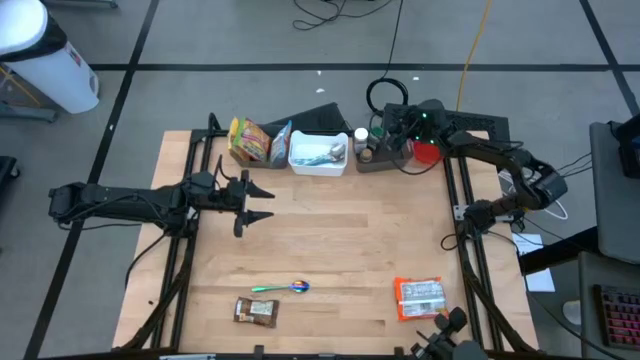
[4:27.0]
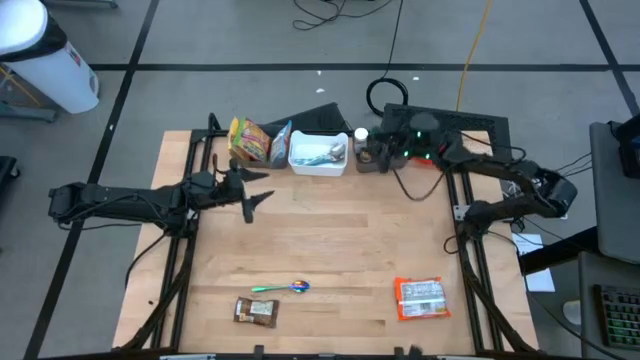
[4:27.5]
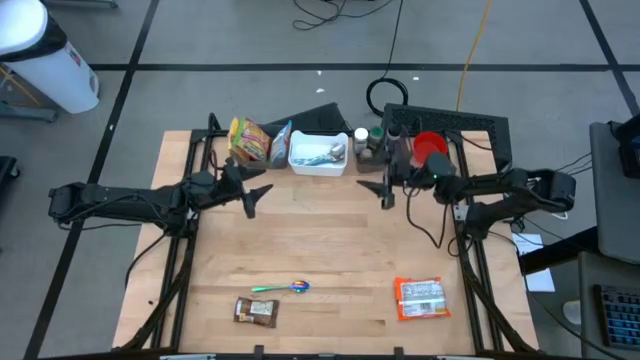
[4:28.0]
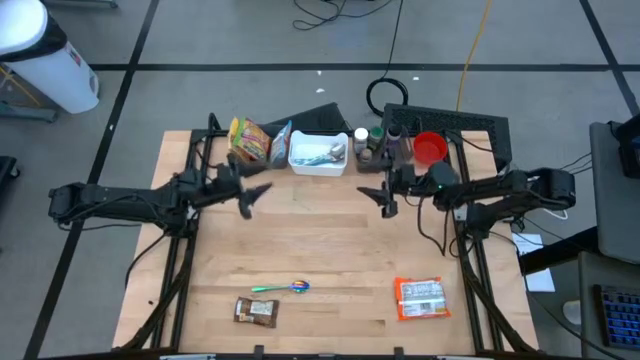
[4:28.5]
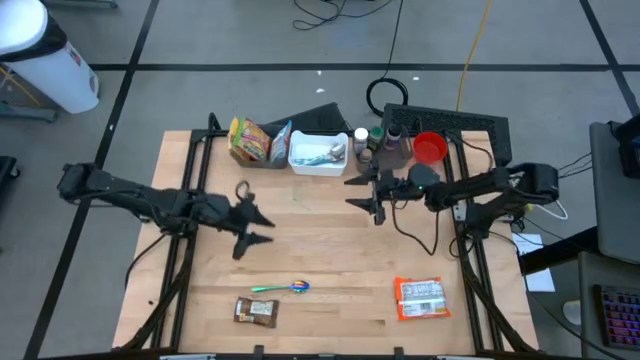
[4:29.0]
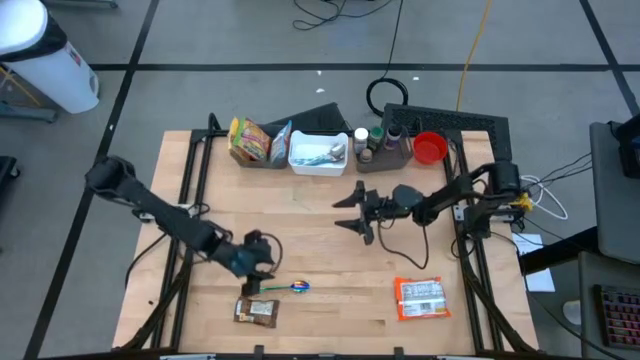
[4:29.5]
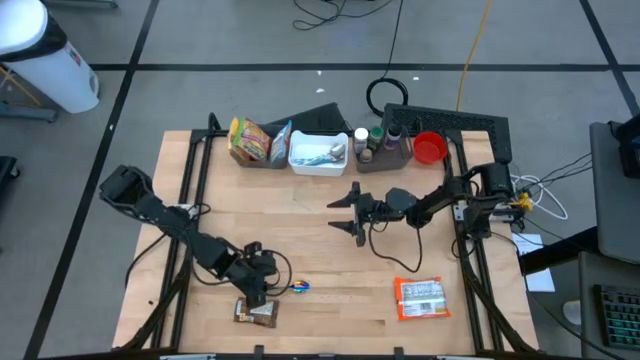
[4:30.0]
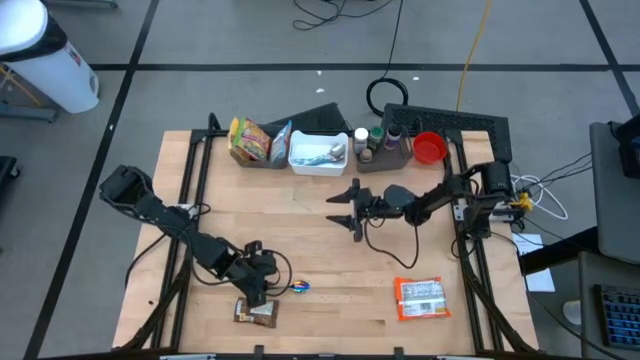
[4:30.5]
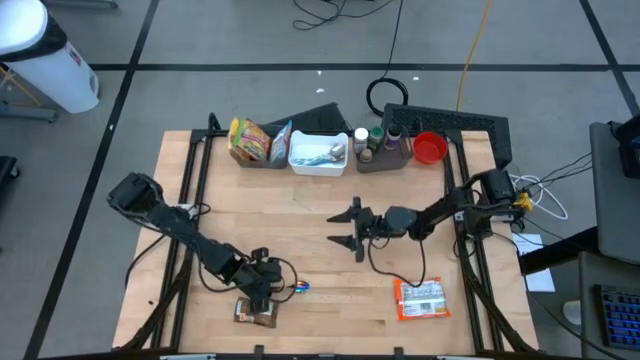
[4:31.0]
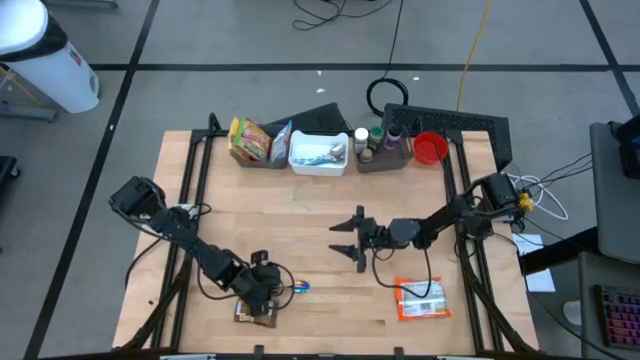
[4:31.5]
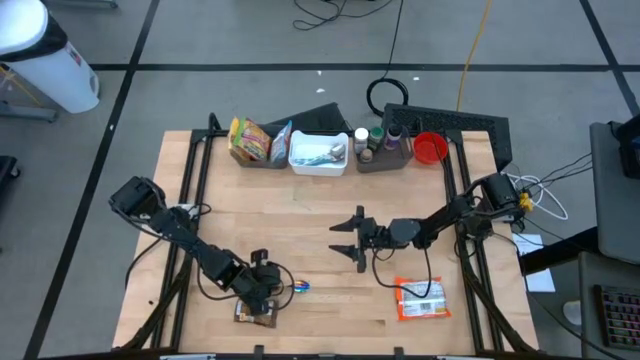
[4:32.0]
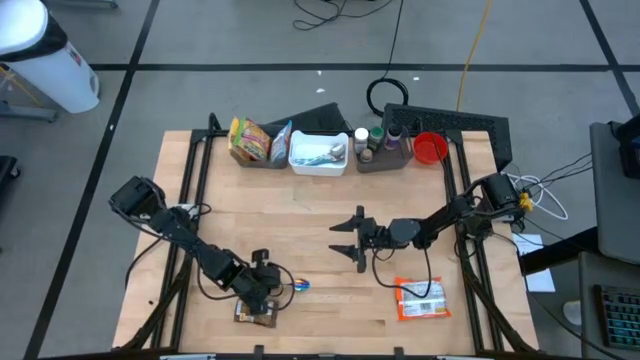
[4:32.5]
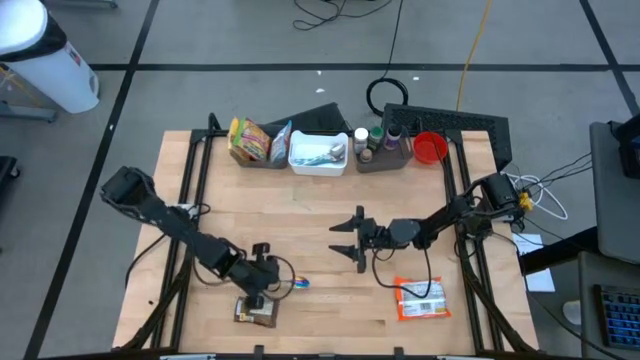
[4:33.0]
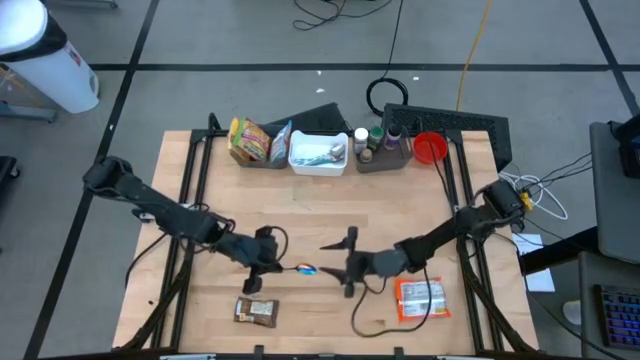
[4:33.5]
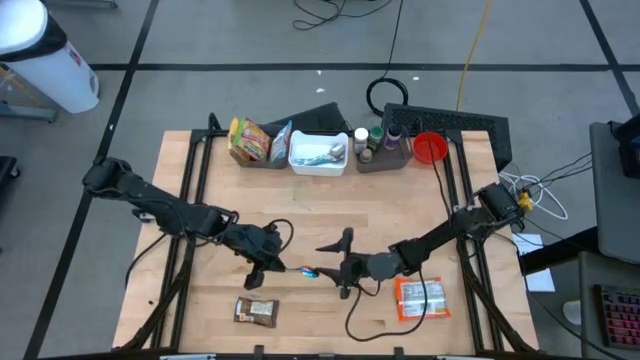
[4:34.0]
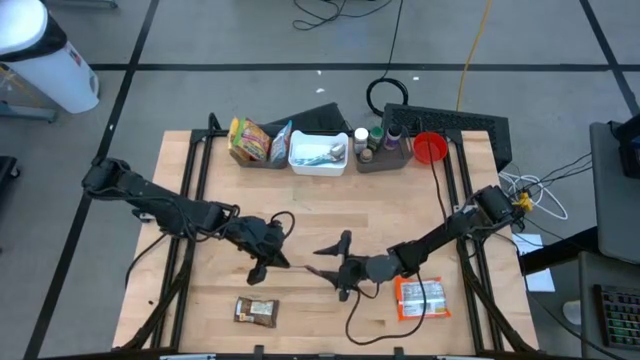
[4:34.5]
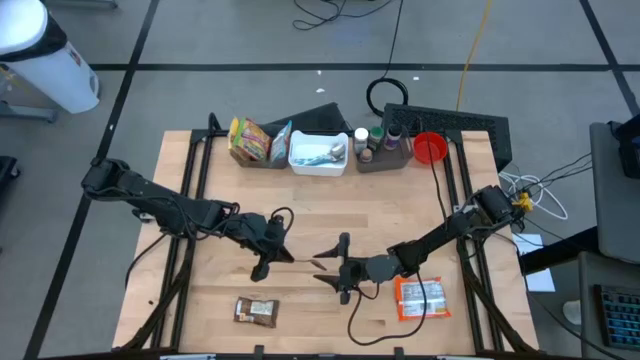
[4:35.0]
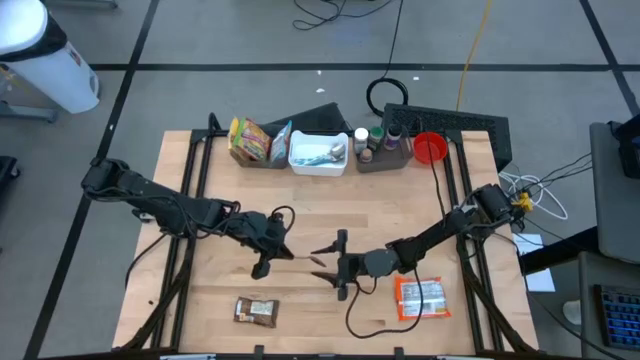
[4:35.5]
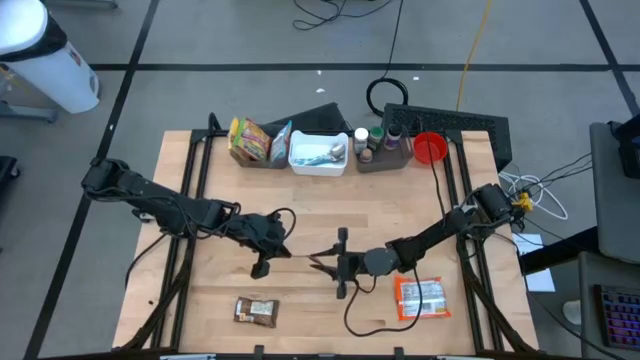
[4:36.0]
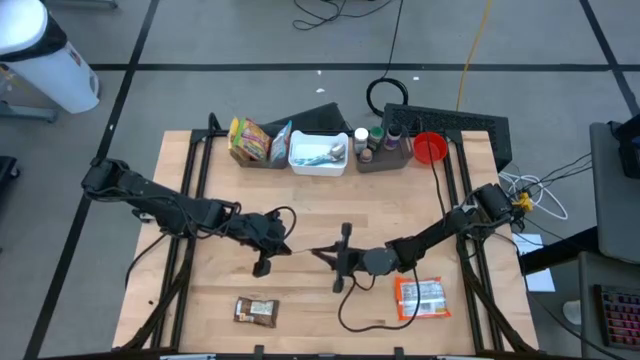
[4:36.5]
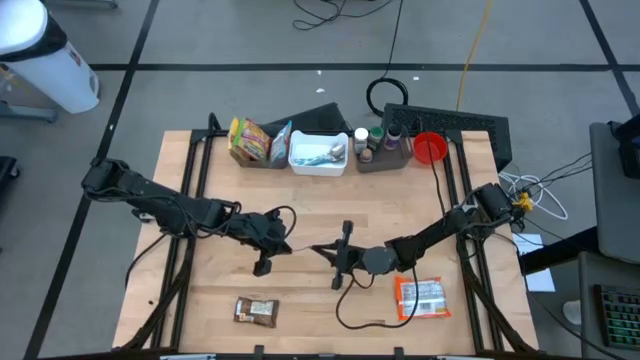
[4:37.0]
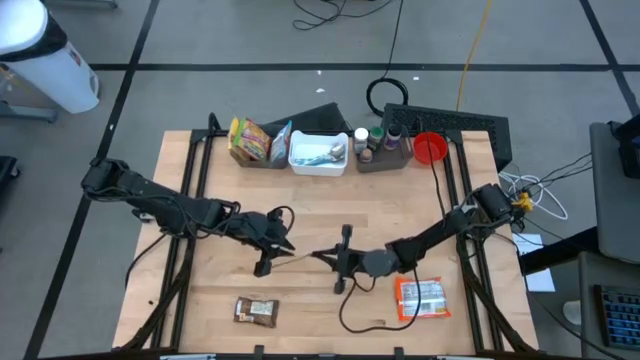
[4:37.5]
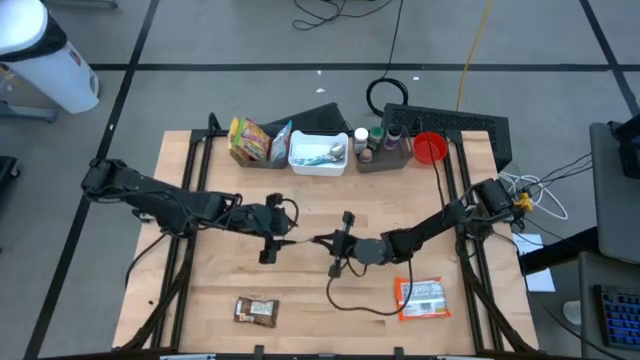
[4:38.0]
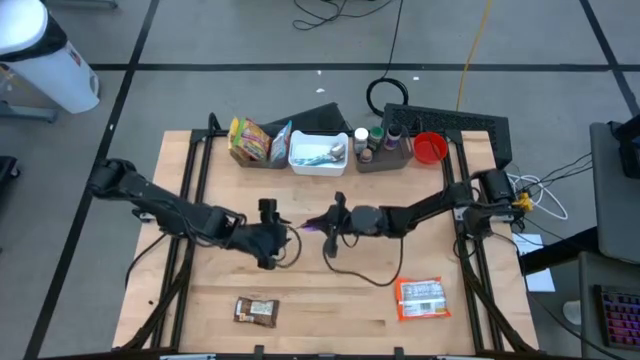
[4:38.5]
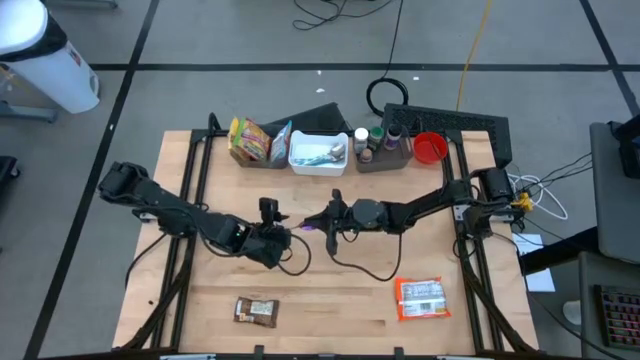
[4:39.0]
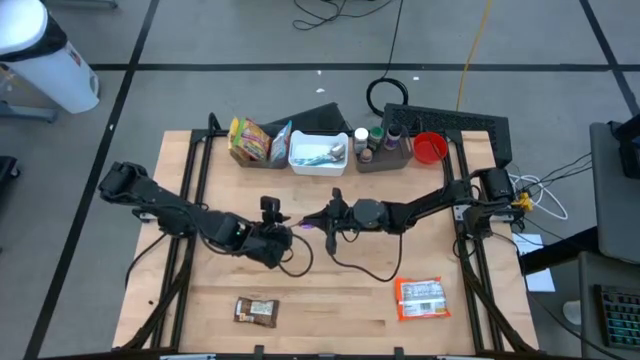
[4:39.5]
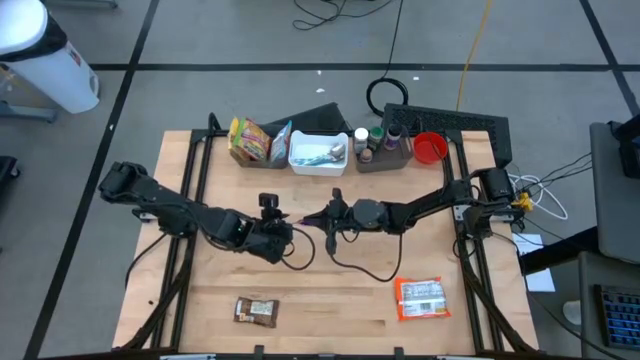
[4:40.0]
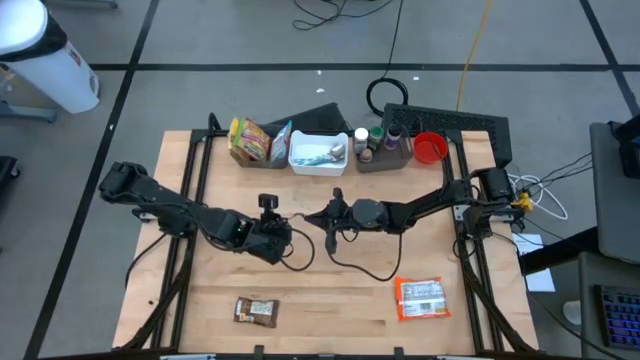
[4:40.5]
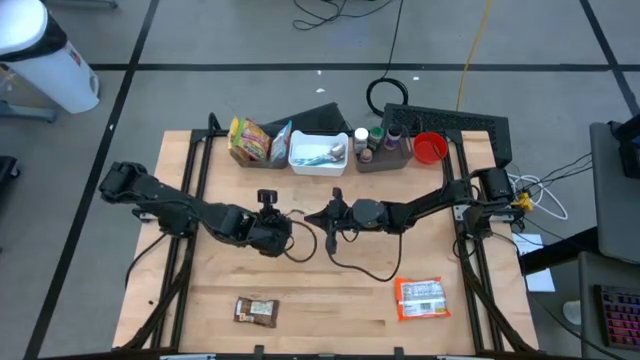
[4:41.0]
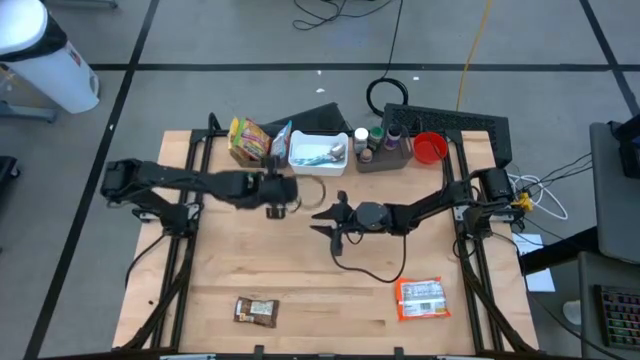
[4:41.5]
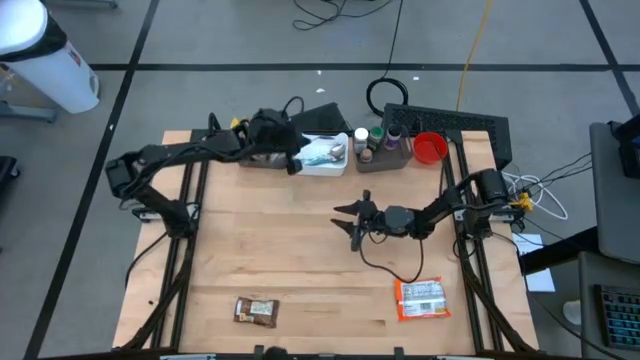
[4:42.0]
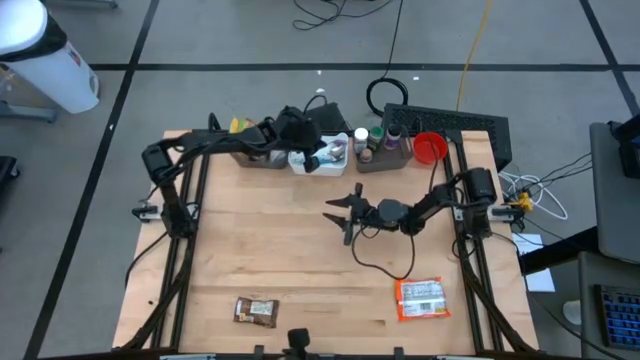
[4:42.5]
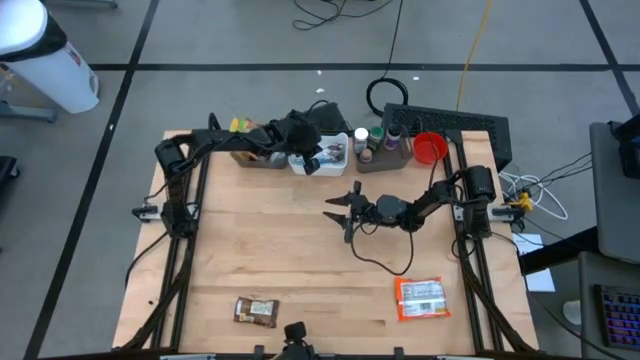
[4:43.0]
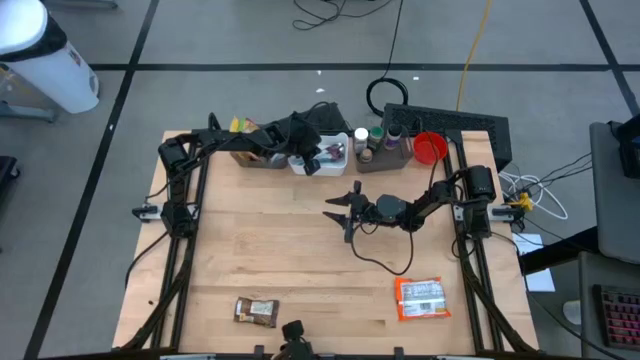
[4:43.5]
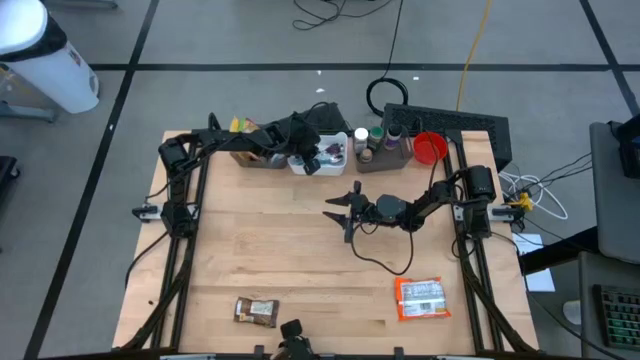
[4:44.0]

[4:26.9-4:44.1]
Task: Pick & Place Food Item
Put the blue spoon into the white bin

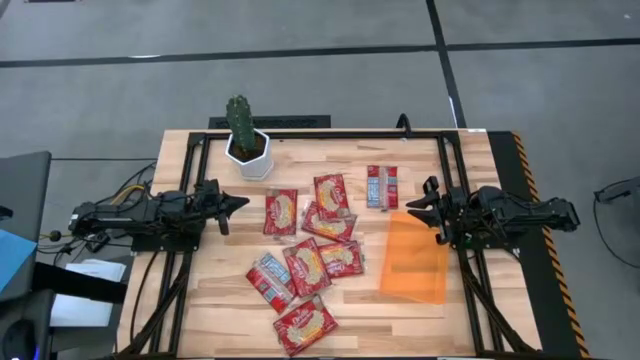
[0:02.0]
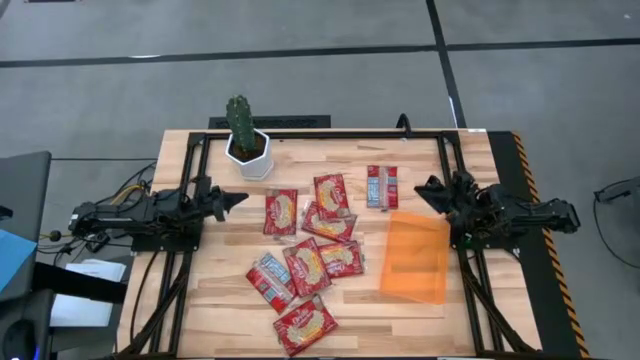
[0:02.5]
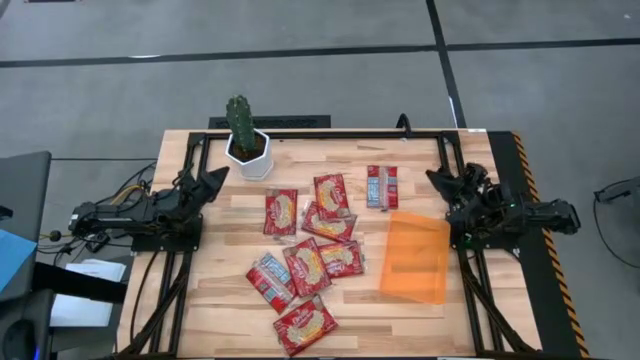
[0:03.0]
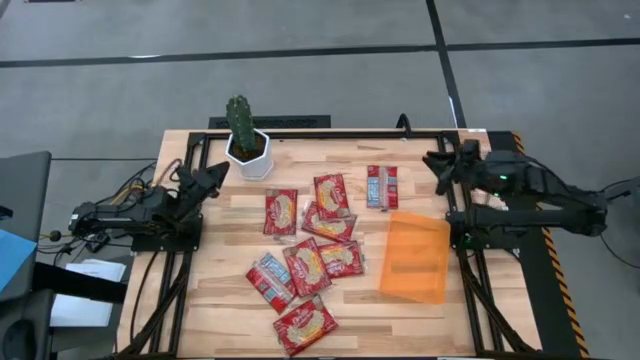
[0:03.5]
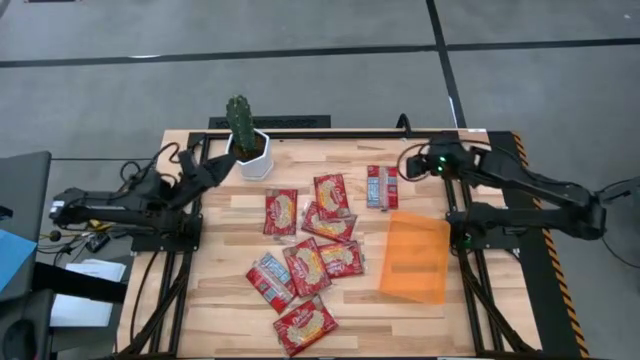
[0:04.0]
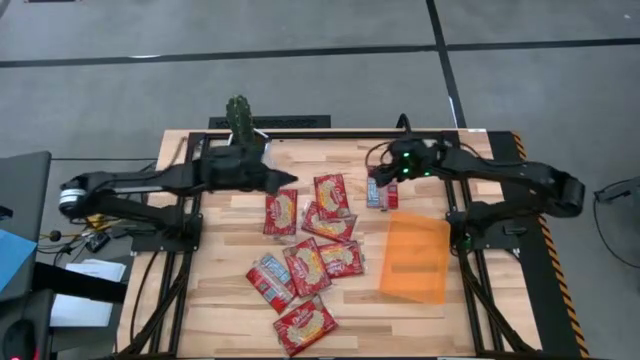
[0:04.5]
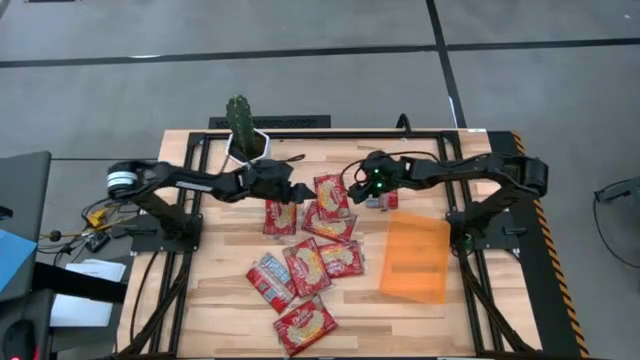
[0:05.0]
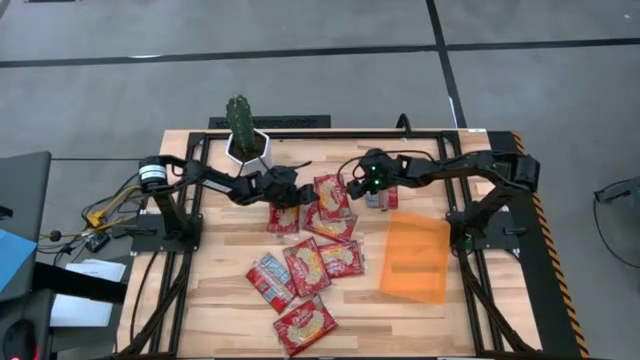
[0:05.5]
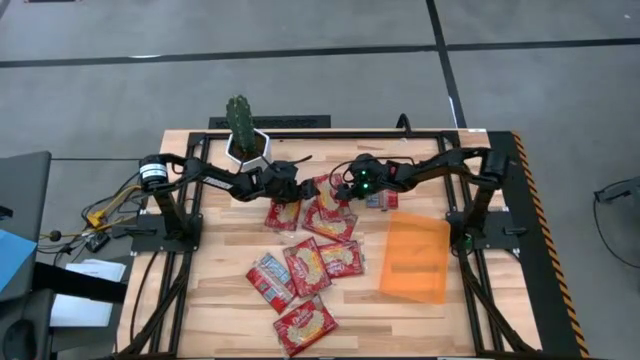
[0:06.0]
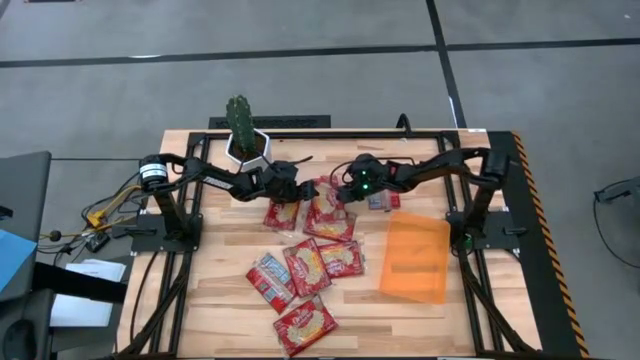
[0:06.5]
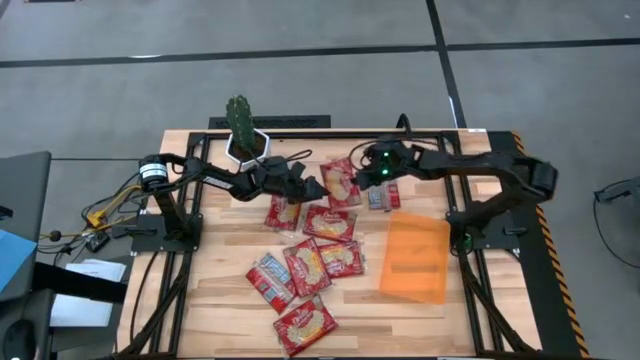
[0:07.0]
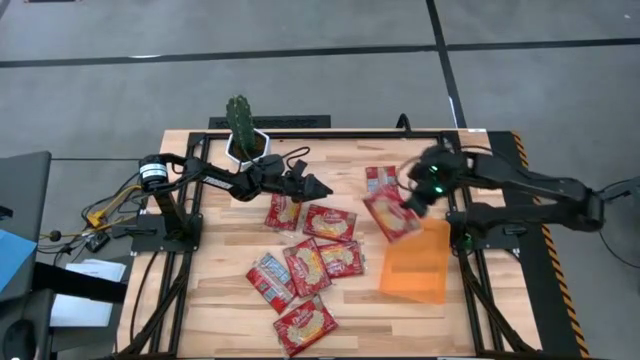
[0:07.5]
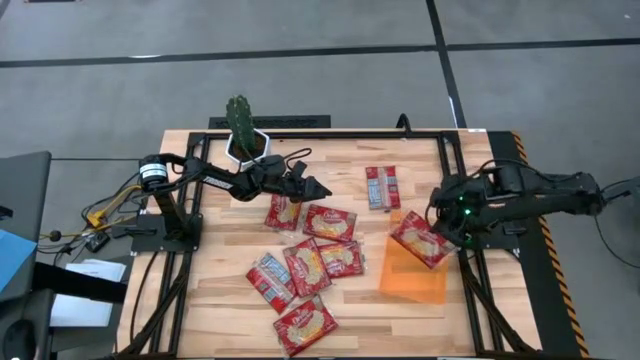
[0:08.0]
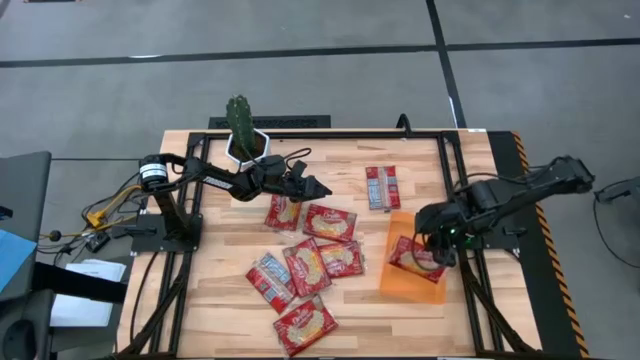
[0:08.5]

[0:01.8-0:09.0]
Task: Sort popcorn bags into baskets
Put the popcorn bag into the orange bin
